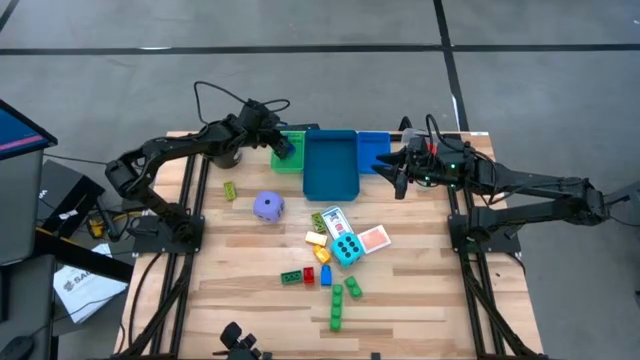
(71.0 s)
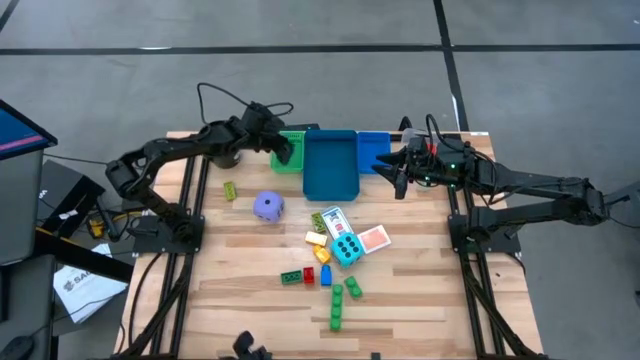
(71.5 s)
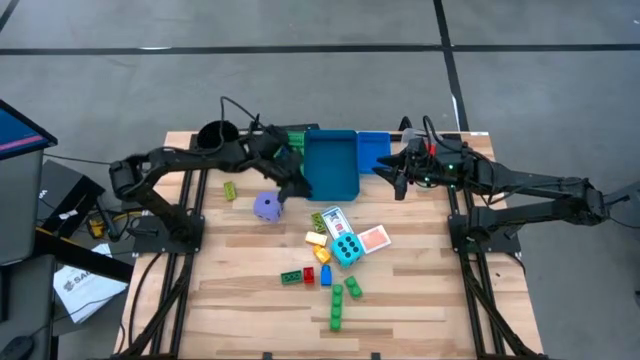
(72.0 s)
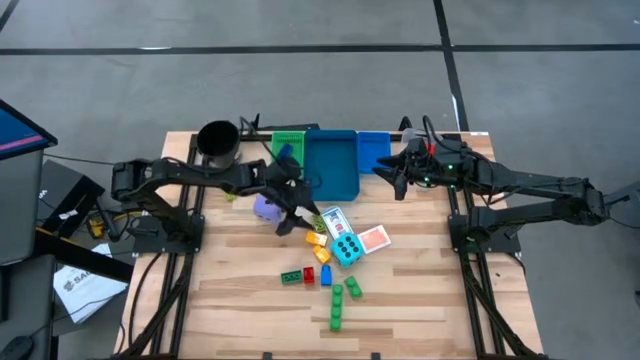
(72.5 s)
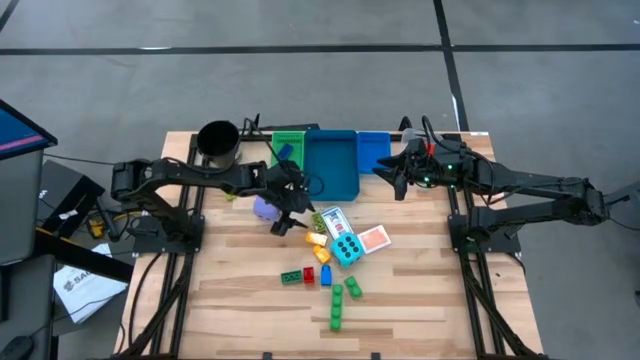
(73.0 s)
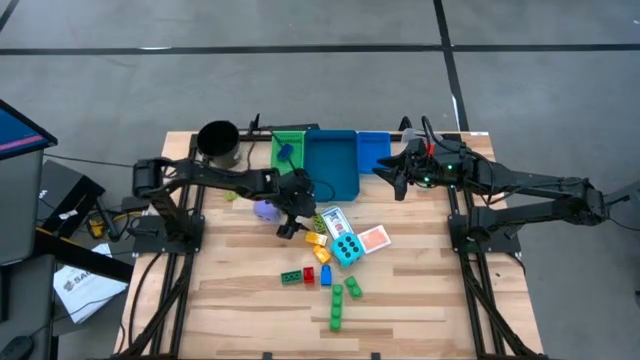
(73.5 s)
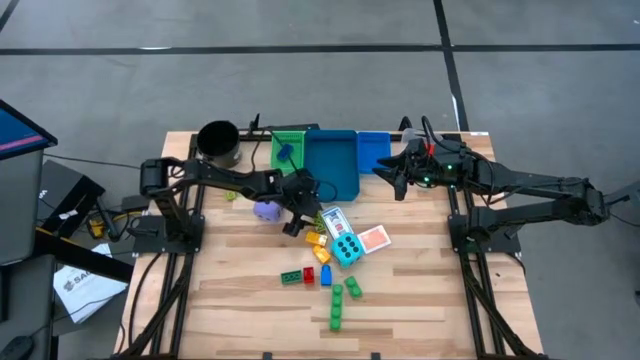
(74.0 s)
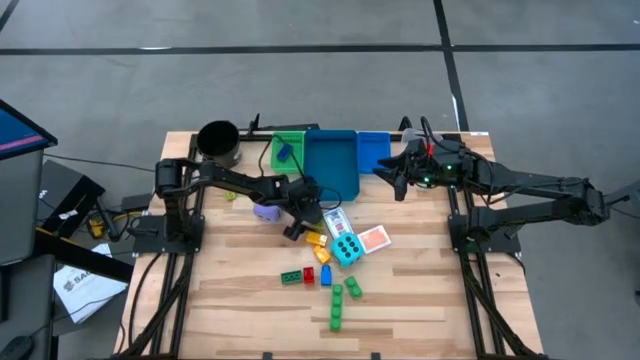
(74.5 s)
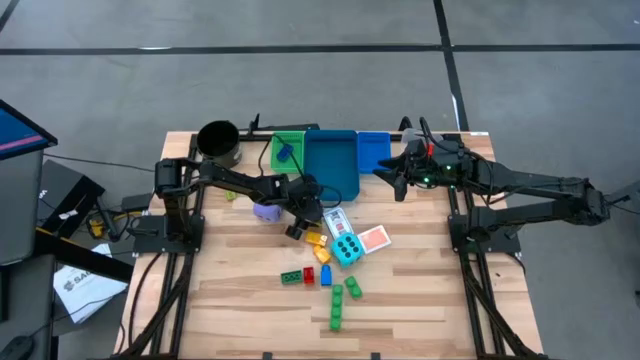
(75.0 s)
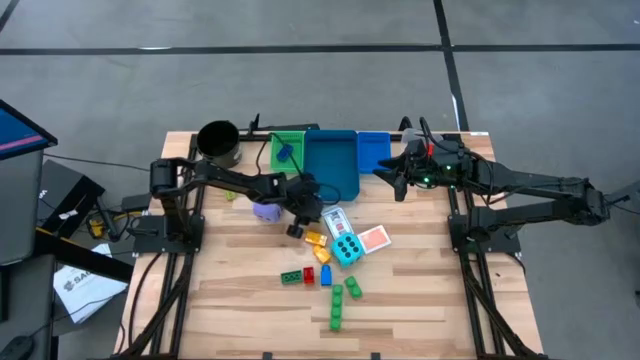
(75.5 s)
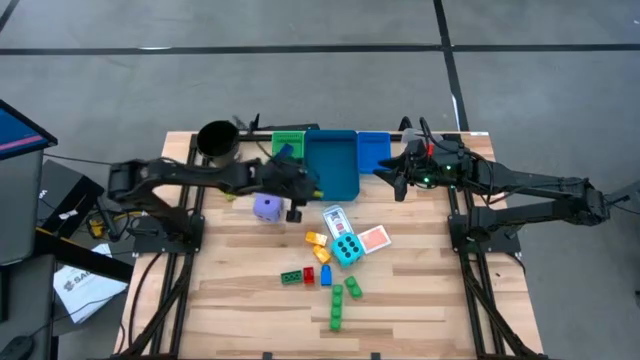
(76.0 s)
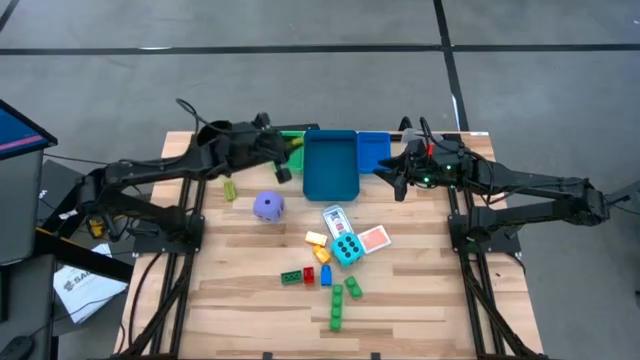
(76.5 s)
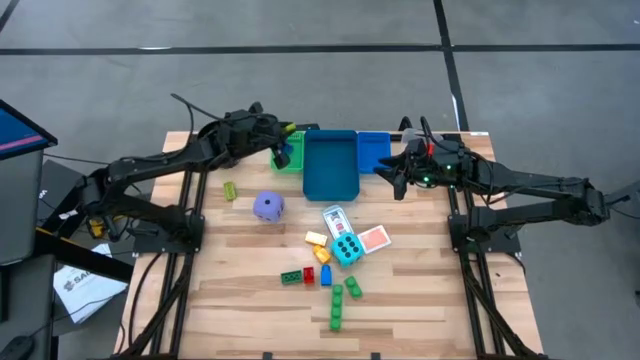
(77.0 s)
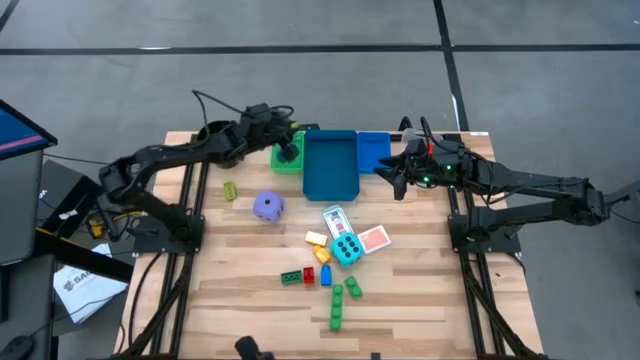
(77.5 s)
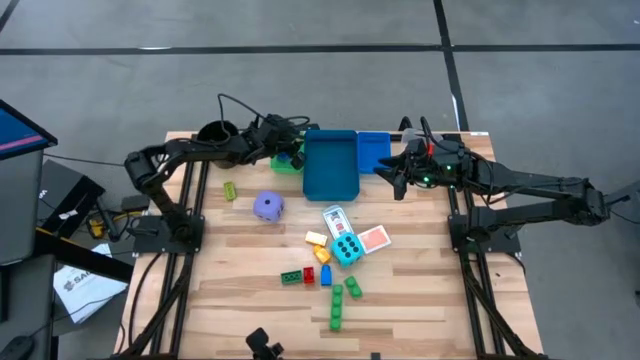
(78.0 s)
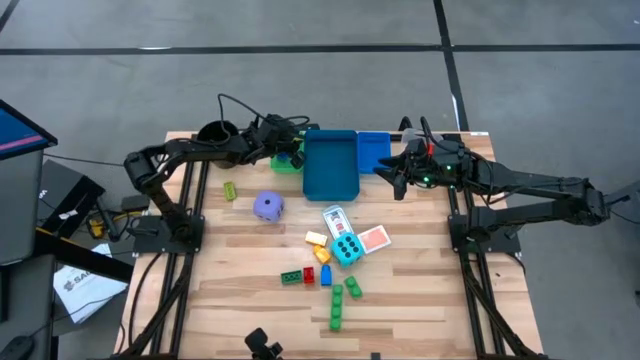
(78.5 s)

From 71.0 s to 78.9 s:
Task: Pick & Place Toys
Put the small light green game piece into the green bin

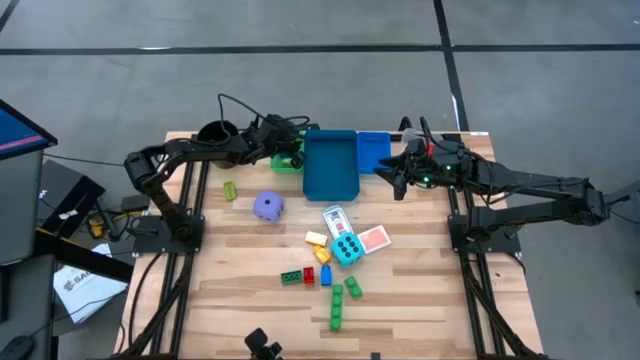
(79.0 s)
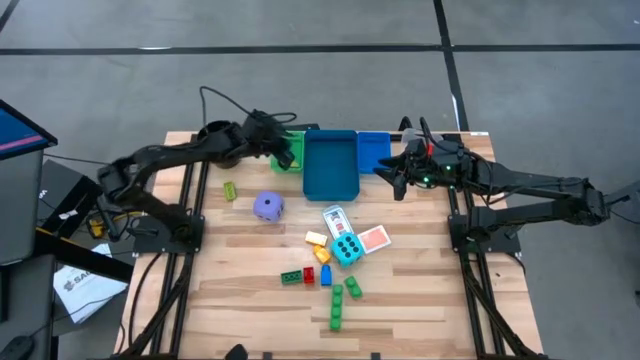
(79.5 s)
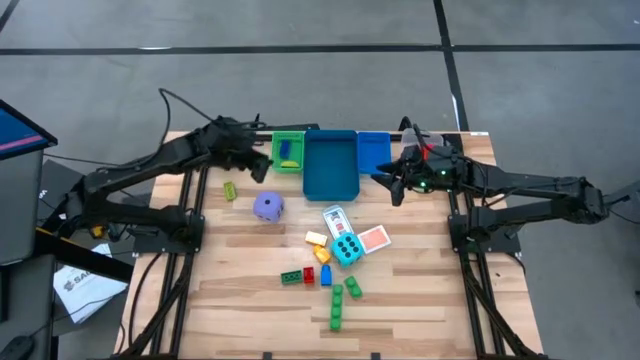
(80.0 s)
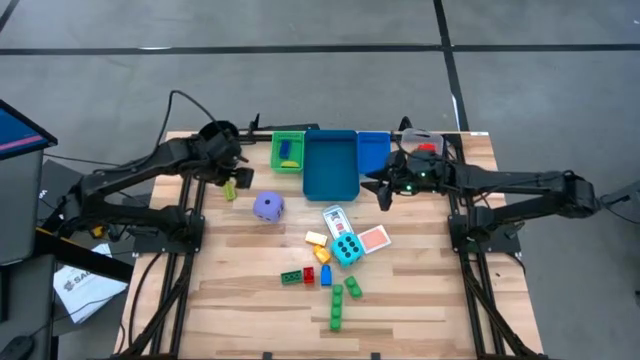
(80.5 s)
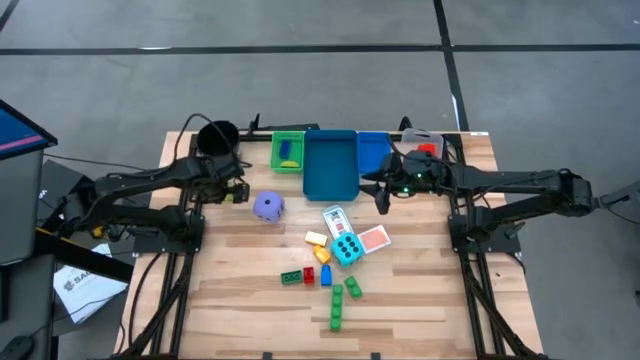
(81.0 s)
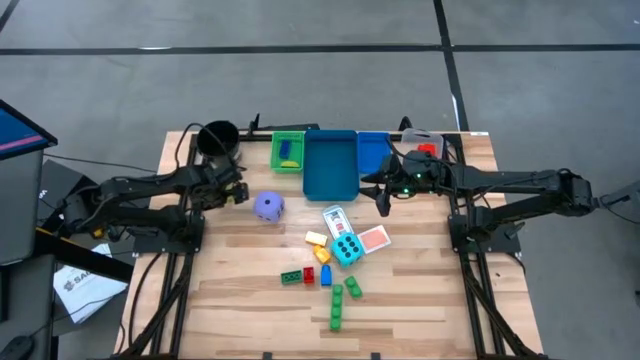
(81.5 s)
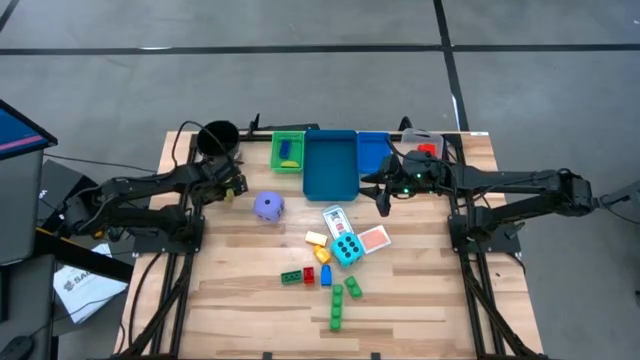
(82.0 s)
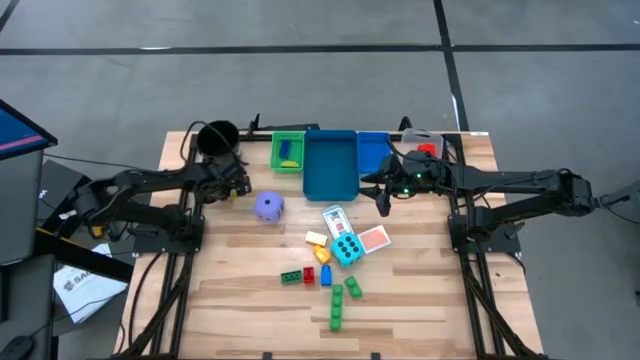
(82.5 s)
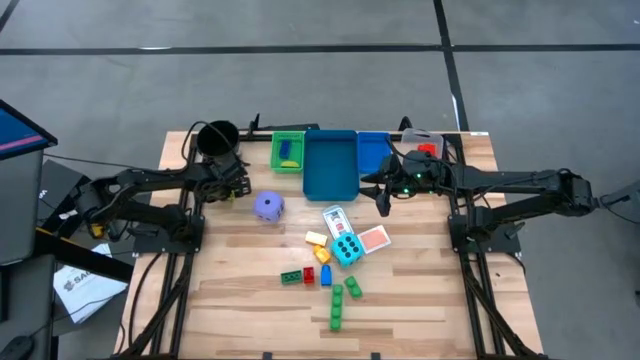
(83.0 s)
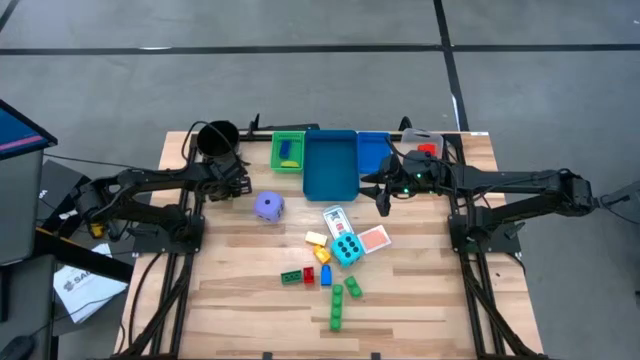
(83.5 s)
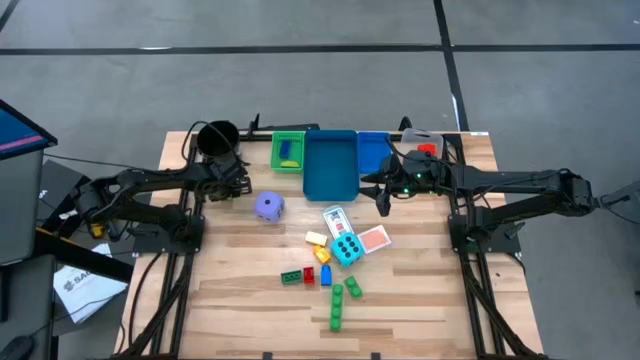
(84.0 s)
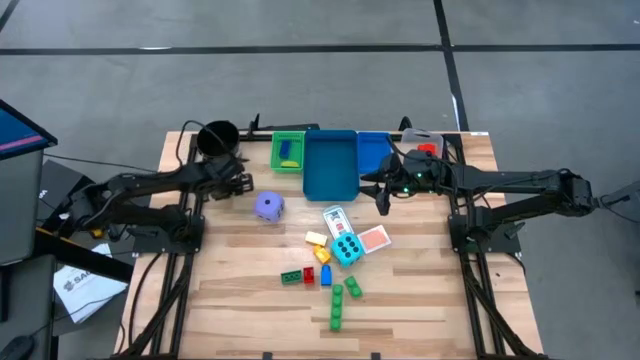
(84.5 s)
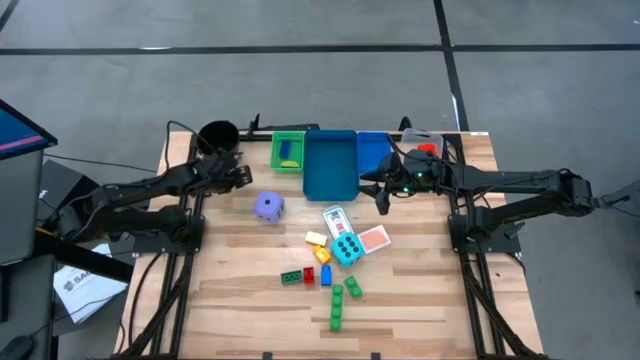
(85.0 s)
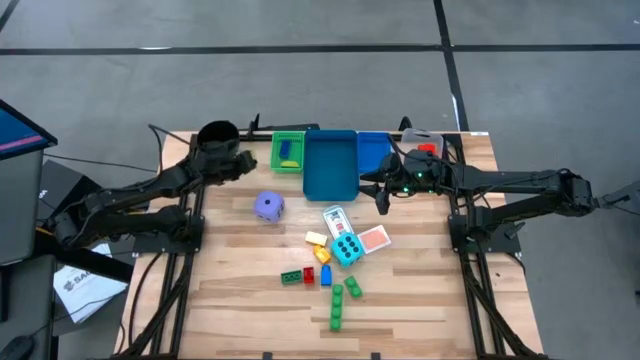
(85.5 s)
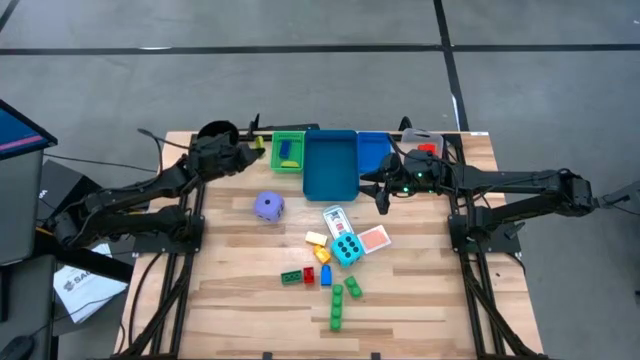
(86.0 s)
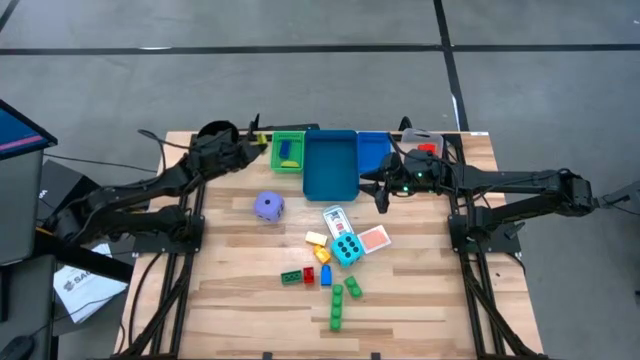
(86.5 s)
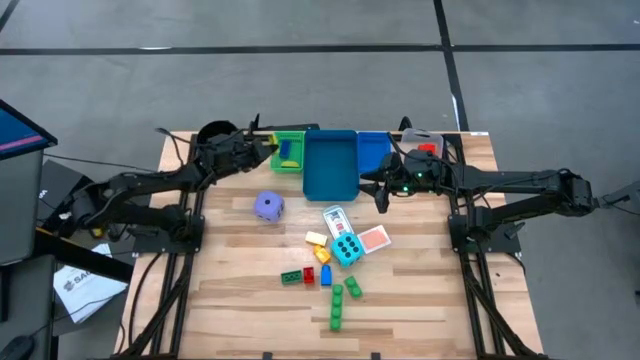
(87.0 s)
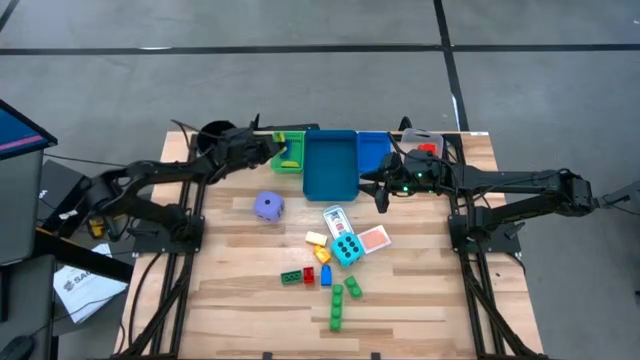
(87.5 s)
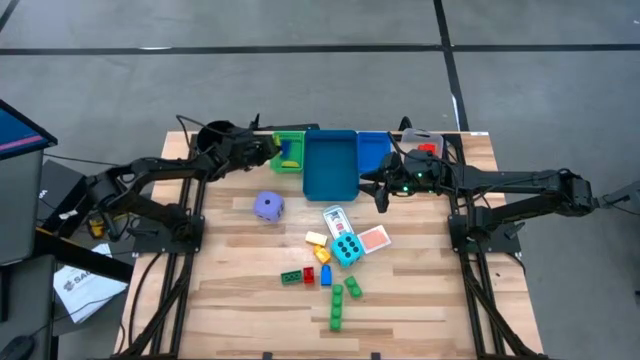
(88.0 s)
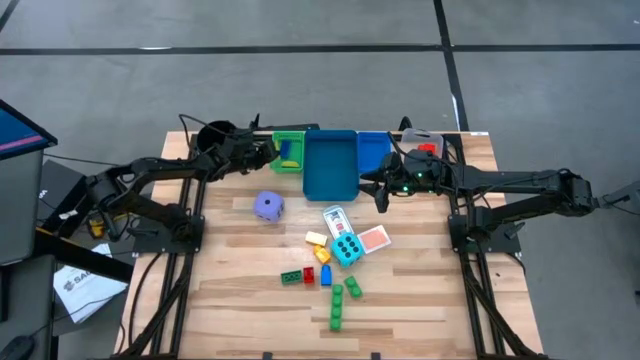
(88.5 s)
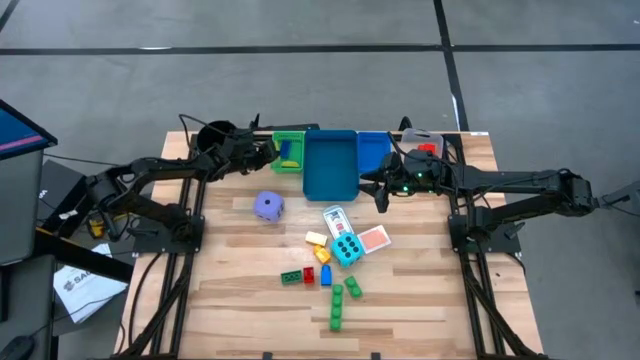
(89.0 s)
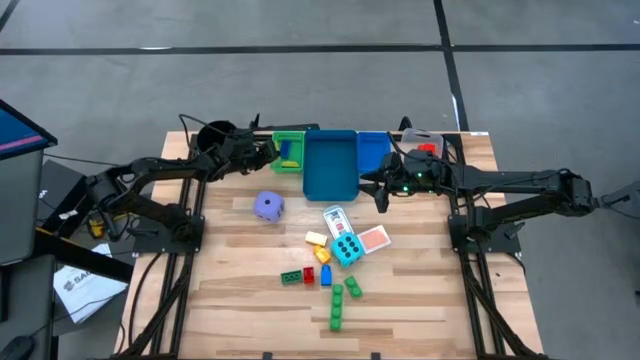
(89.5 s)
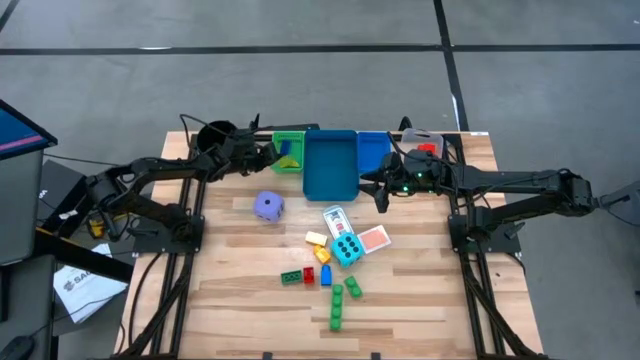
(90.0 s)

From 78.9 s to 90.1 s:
Put the small light green game piece into the green bin

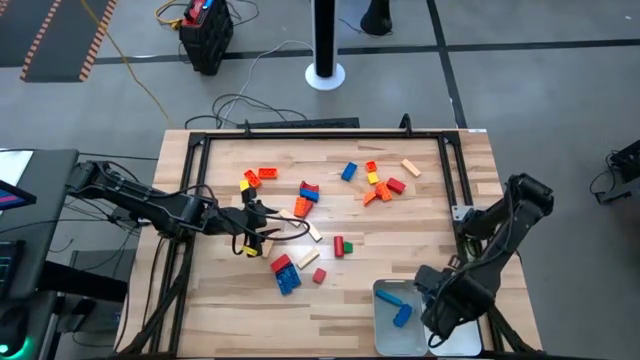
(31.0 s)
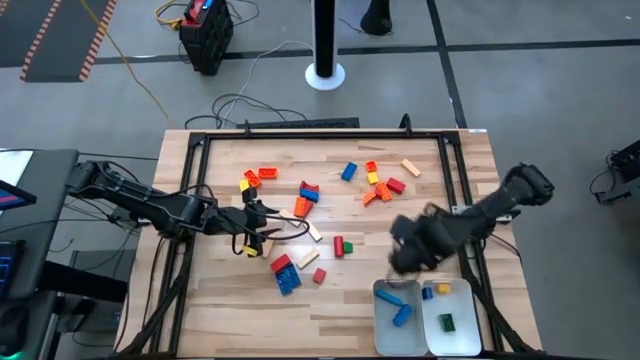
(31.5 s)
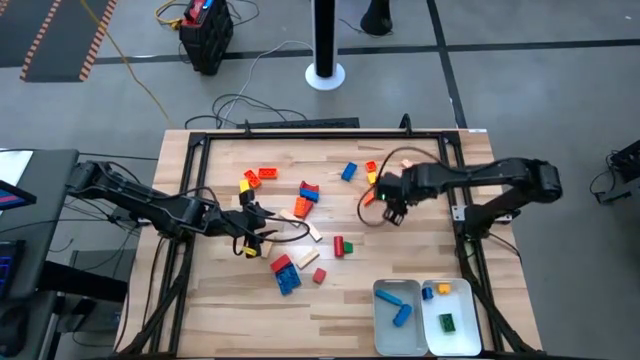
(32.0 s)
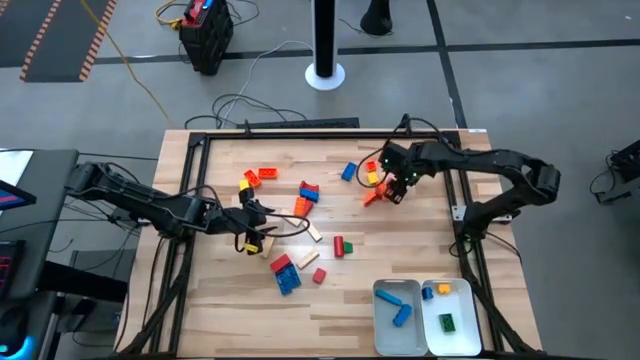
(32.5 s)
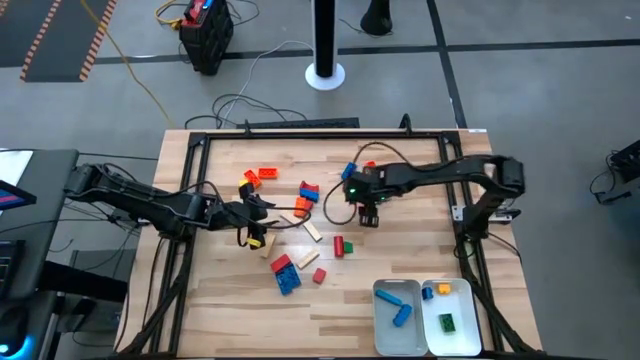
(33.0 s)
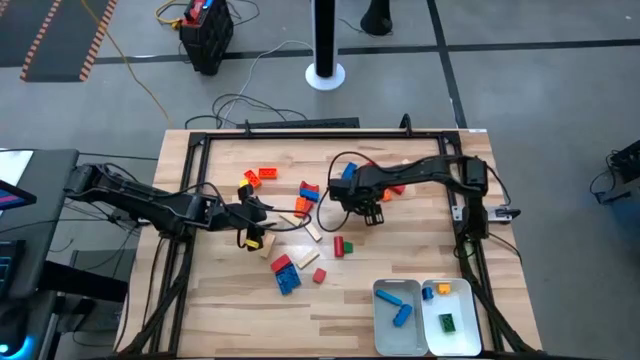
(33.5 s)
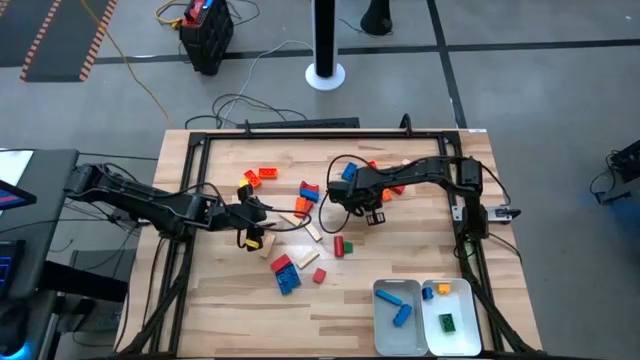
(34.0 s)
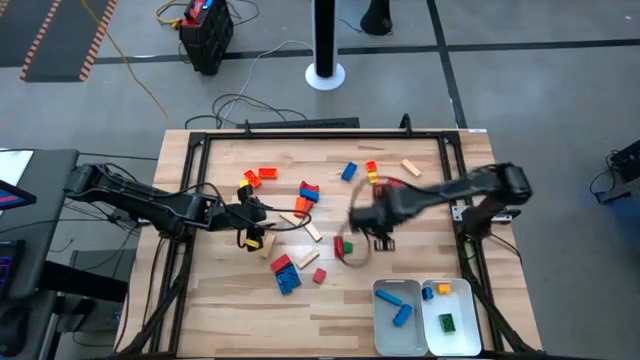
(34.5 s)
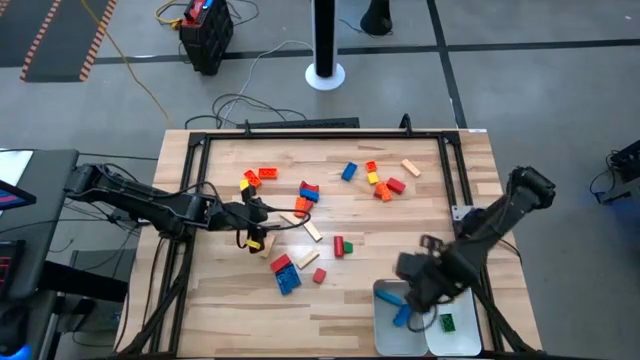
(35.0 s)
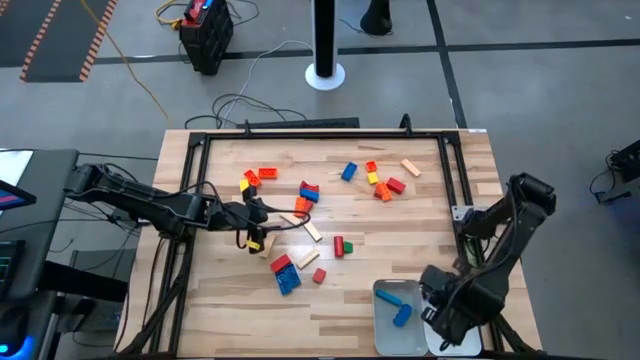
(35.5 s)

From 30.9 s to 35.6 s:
Task: Sort blocks by size
Put the small orange game piece into the white bin
